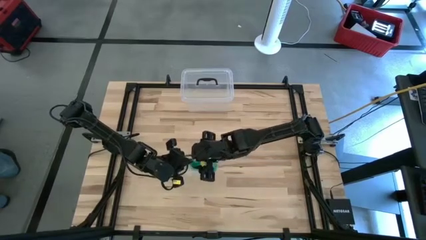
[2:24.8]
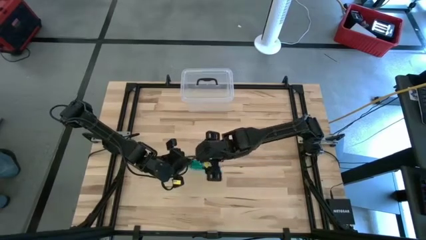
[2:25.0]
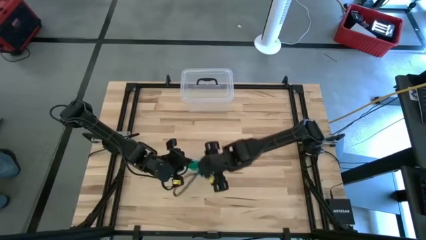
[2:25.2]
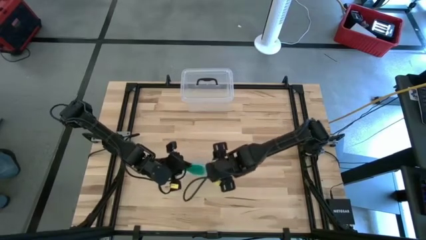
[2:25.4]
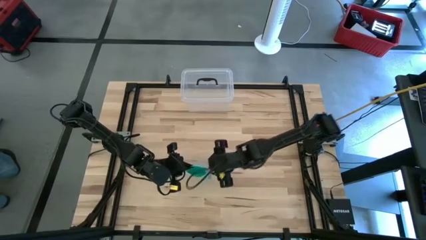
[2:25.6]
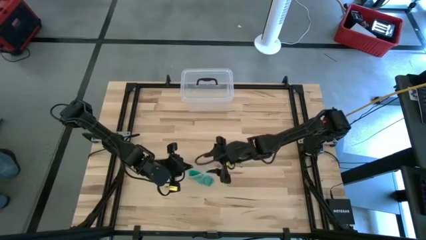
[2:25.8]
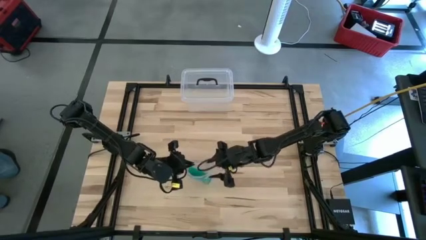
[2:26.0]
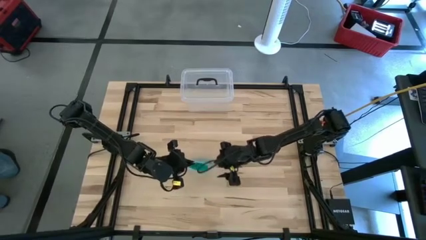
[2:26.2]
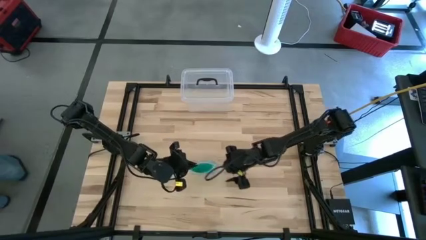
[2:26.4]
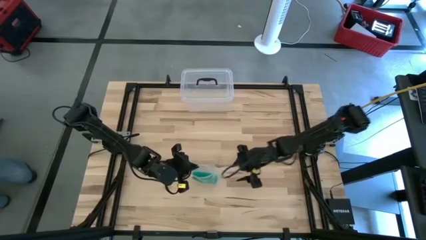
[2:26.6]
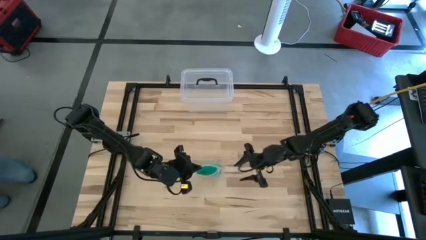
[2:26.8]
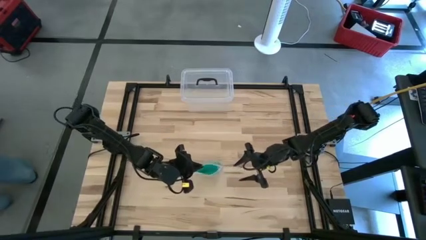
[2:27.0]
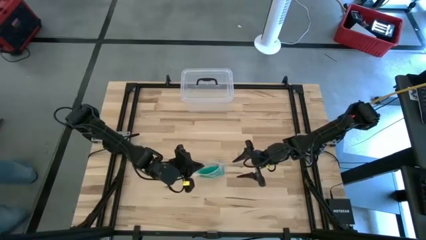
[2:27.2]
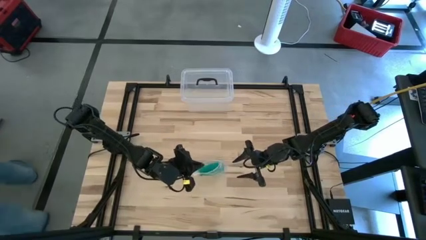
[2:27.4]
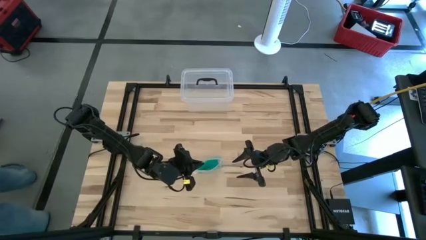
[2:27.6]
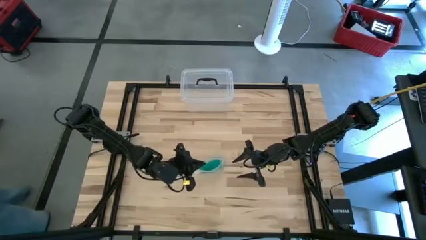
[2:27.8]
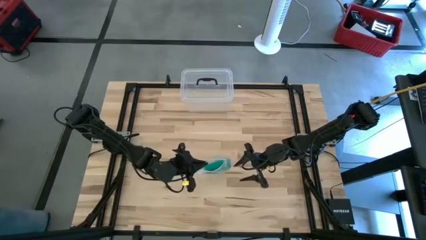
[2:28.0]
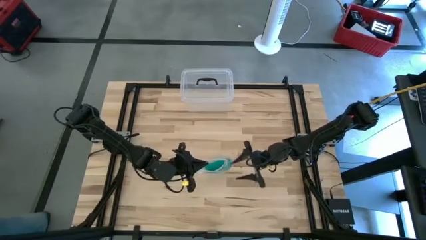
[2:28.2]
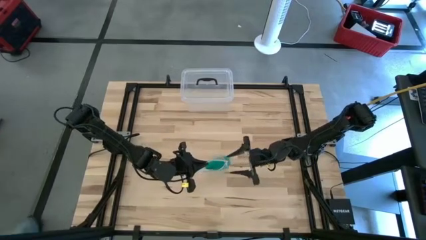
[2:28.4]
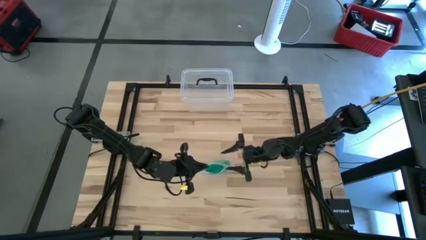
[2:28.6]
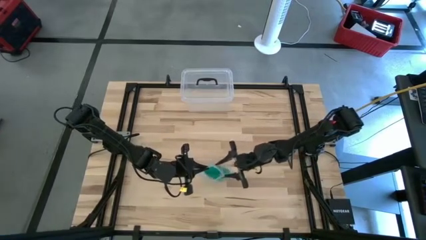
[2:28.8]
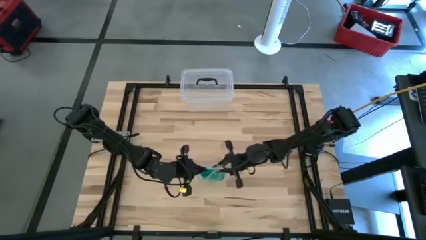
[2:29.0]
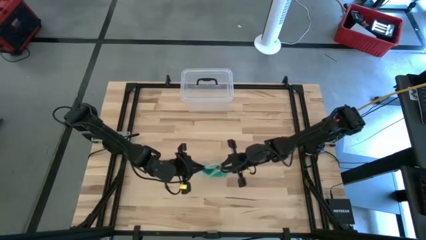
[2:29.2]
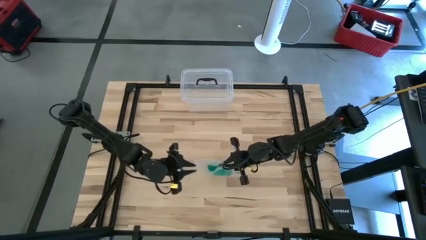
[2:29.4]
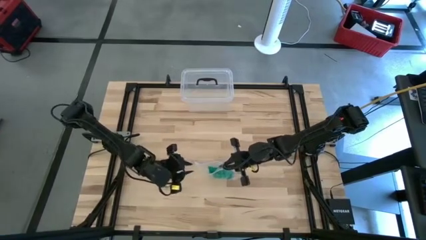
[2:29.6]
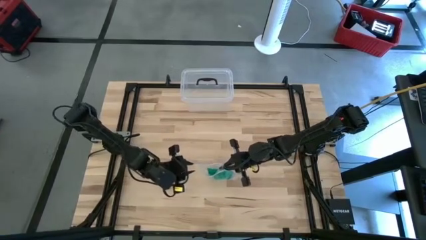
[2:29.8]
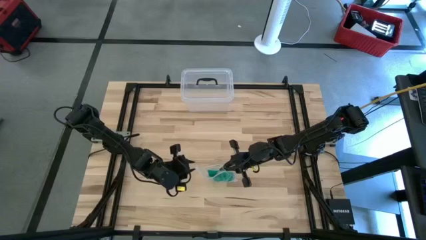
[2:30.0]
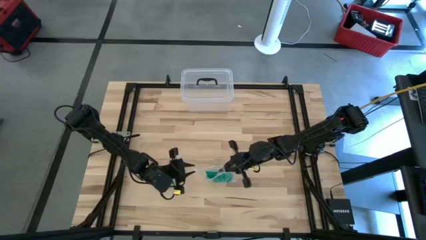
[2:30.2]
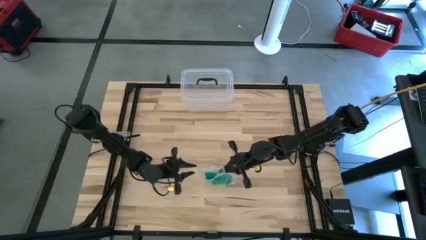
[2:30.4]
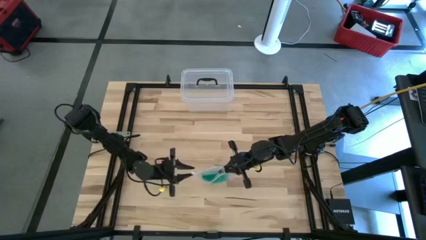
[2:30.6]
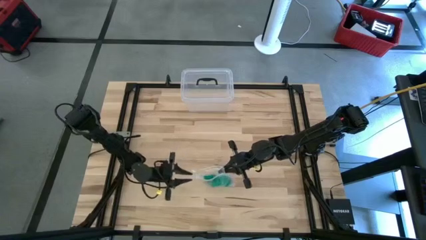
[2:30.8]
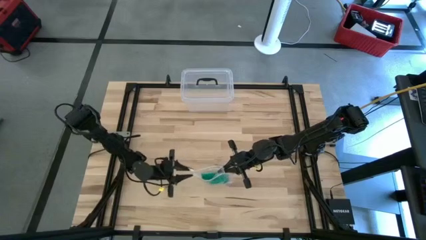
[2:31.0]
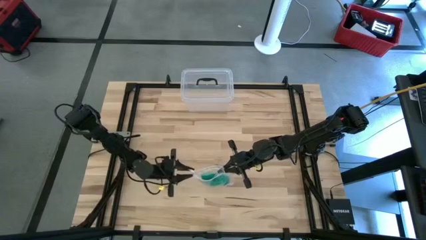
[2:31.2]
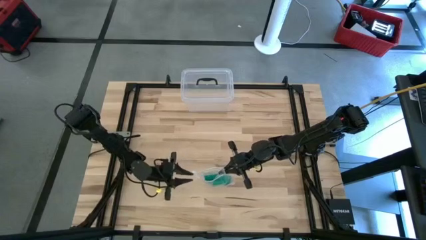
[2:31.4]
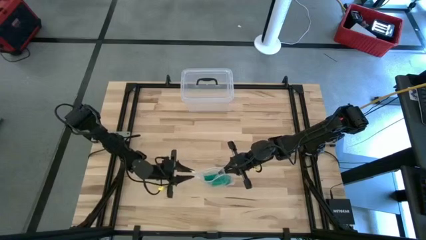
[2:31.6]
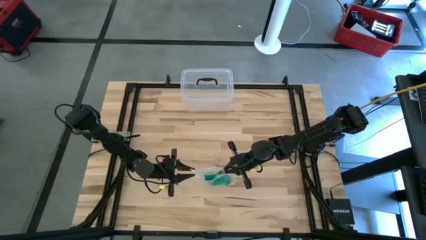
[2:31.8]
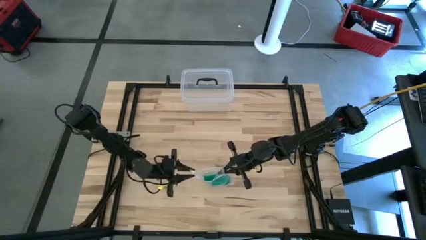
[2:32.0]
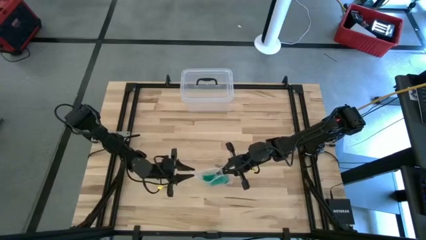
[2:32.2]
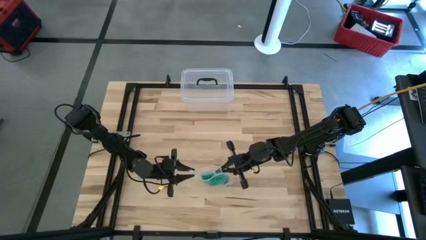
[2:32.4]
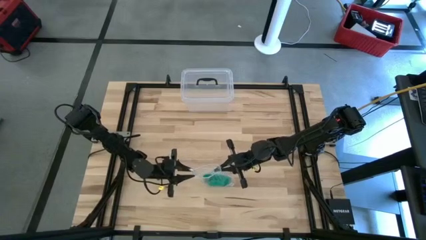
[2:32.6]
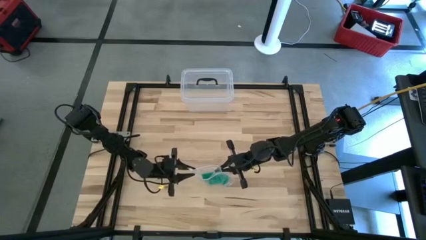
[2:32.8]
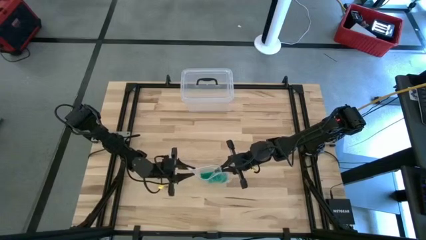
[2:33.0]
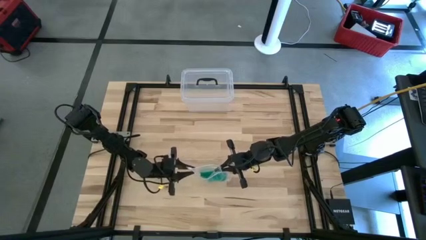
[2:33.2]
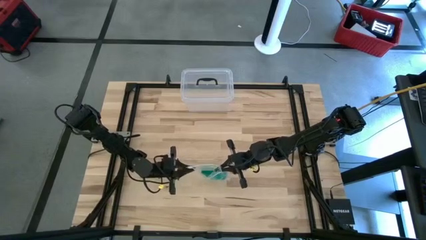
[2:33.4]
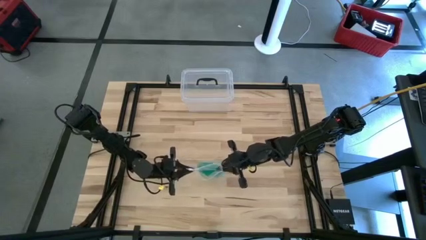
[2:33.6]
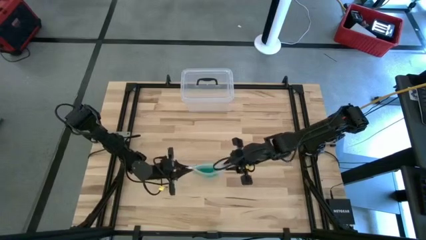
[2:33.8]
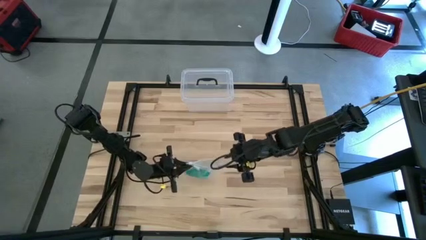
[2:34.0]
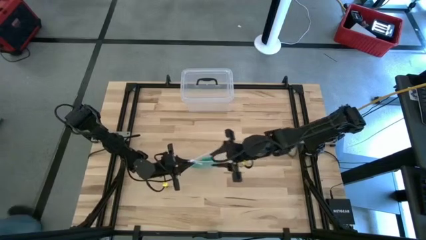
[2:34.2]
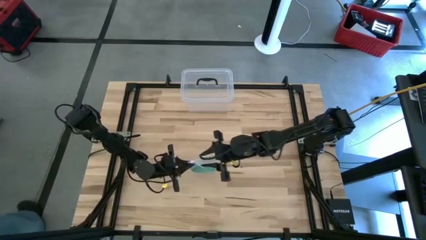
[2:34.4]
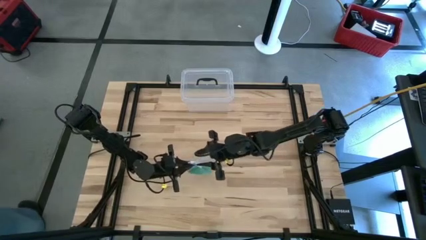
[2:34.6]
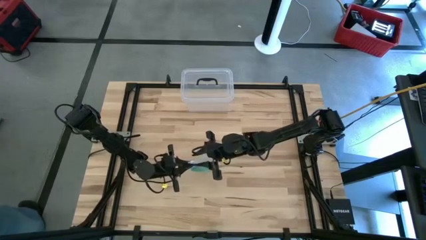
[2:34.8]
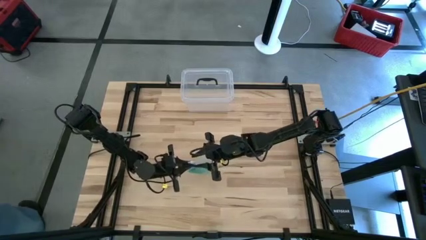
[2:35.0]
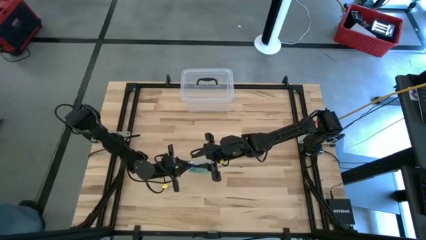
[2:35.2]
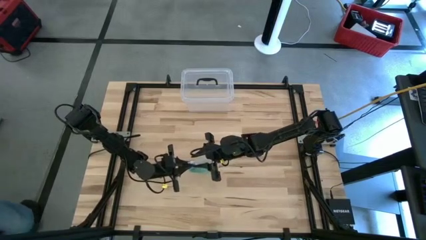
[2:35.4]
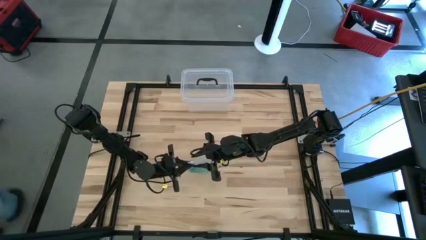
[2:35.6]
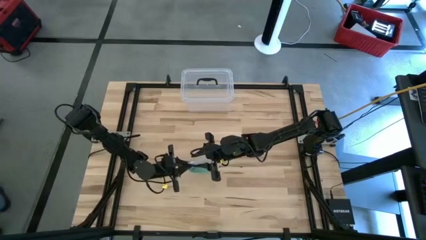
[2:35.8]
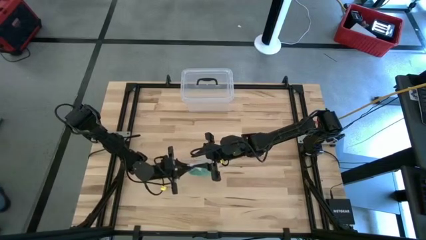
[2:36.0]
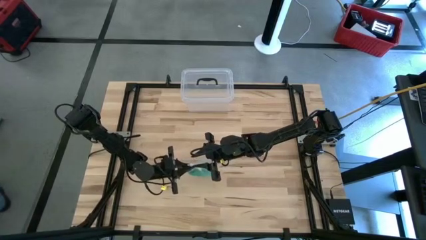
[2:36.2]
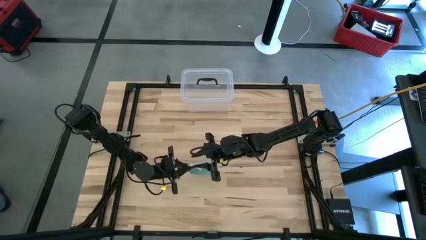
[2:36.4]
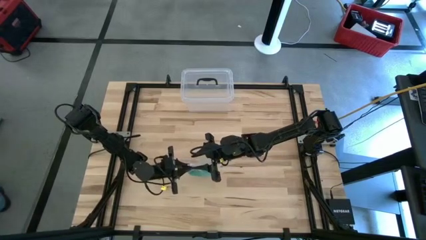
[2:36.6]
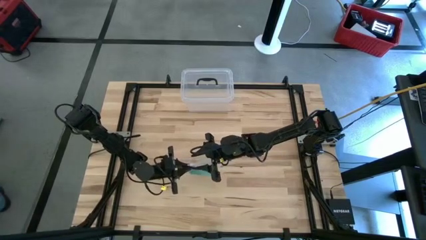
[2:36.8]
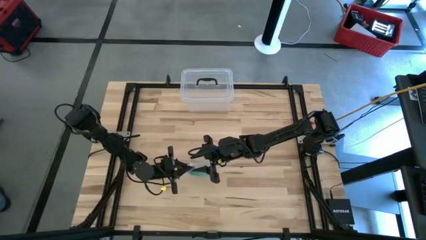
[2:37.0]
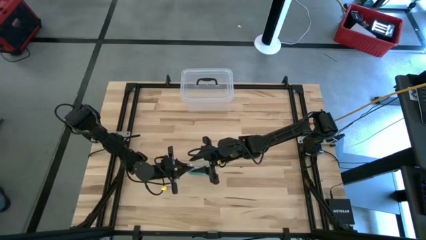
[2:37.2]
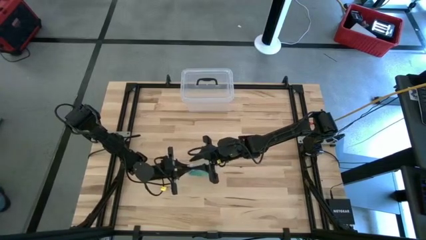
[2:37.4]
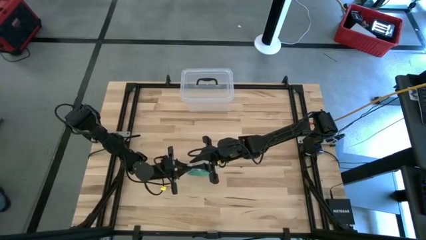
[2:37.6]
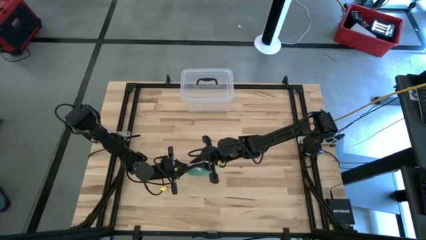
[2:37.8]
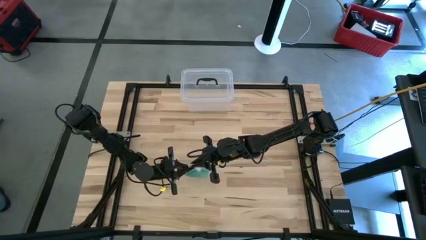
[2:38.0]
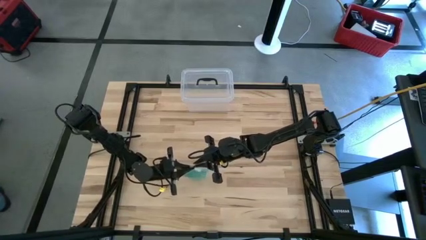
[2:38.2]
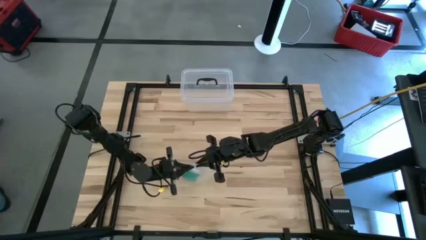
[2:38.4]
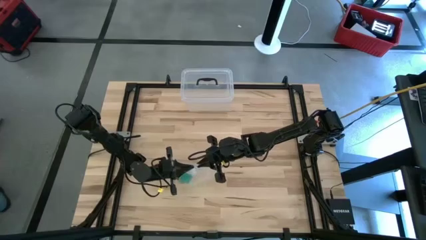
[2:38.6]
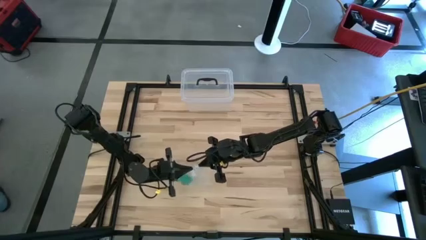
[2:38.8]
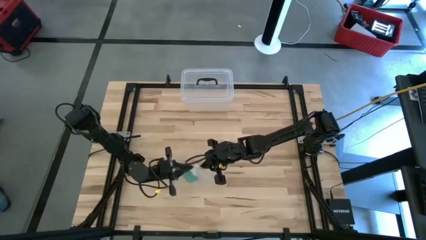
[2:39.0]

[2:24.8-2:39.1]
Task: Roll bandage
Close the transparent zip bag

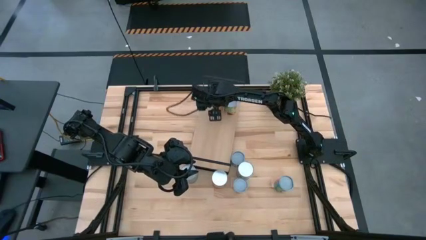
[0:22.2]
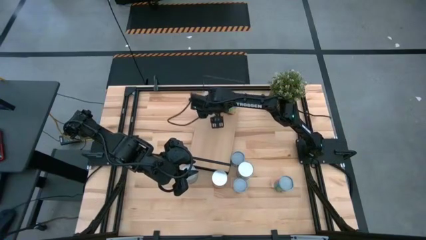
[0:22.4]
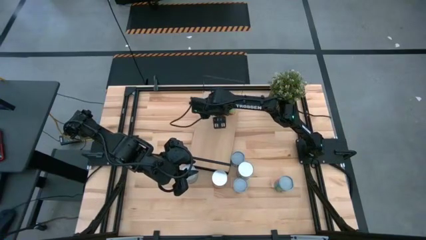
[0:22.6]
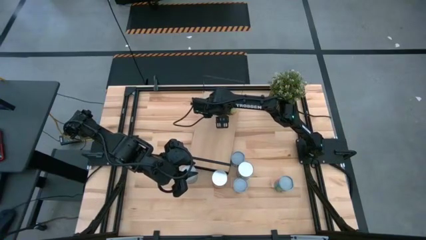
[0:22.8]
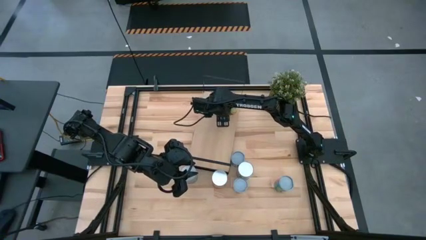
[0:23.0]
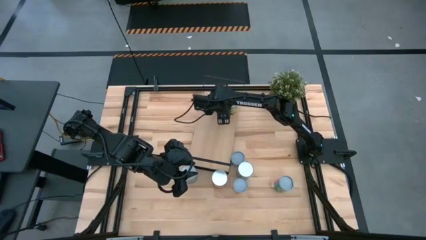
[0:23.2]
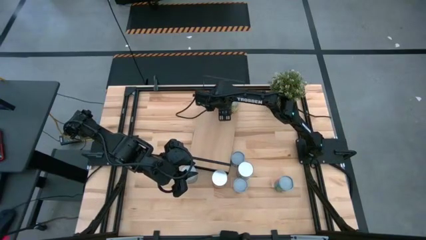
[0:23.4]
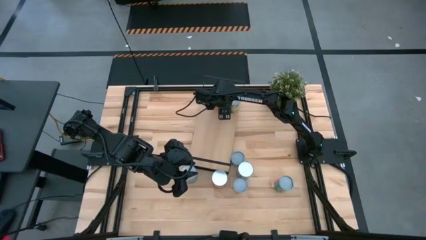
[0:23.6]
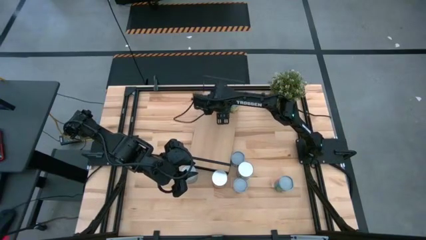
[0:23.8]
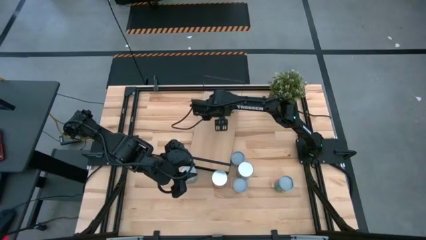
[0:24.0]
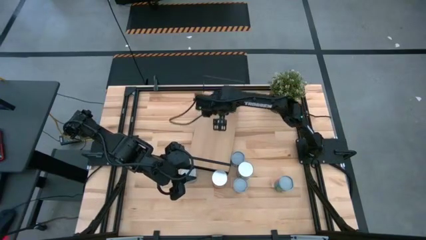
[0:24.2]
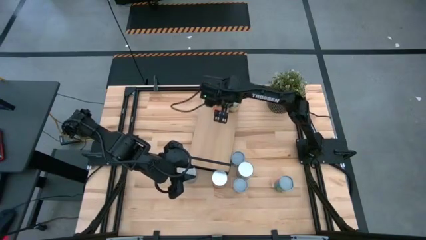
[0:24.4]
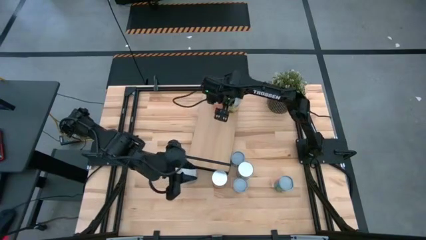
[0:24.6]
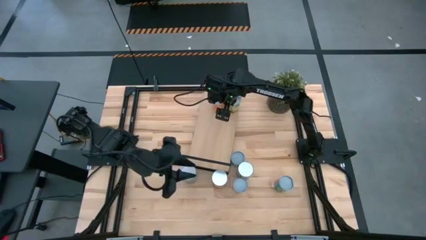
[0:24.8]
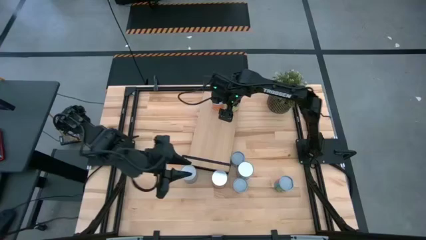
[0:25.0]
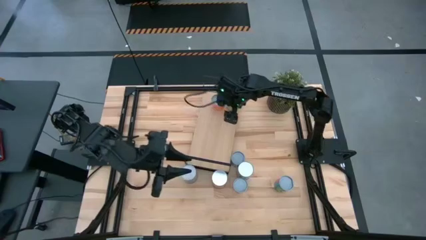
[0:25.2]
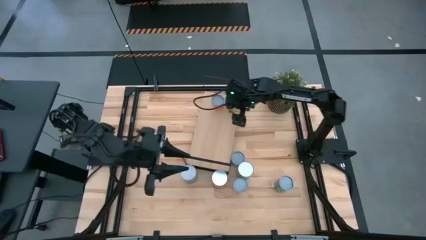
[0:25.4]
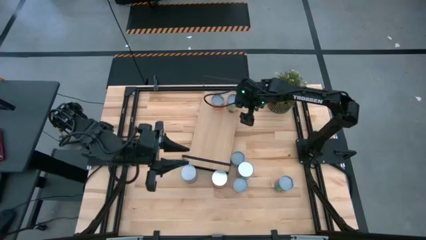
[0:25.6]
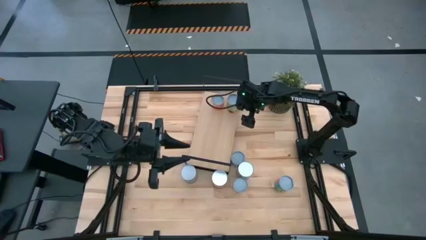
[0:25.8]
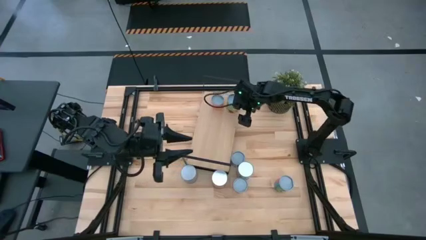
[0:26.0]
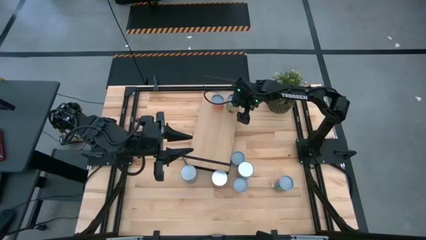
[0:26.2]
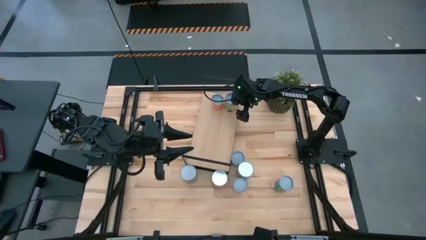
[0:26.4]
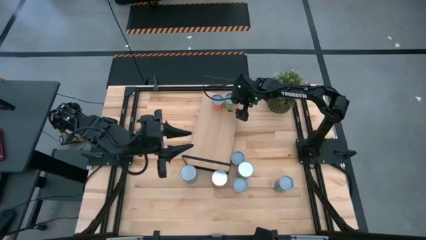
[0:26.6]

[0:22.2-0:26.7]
Task: Pick and place cans onto a shelf
Adjust the green can on the shelf
